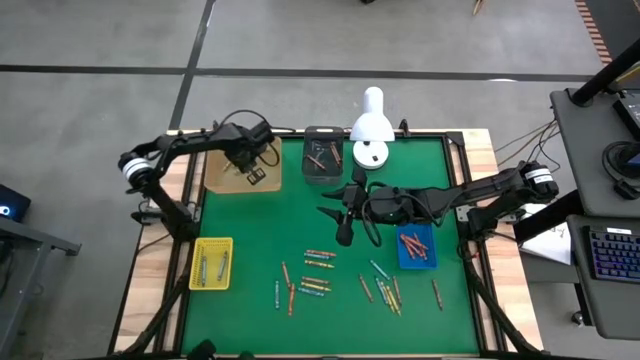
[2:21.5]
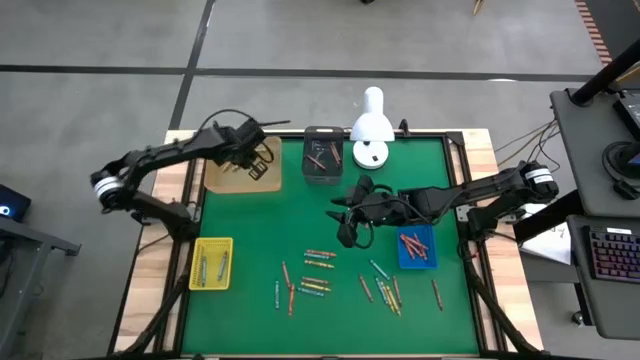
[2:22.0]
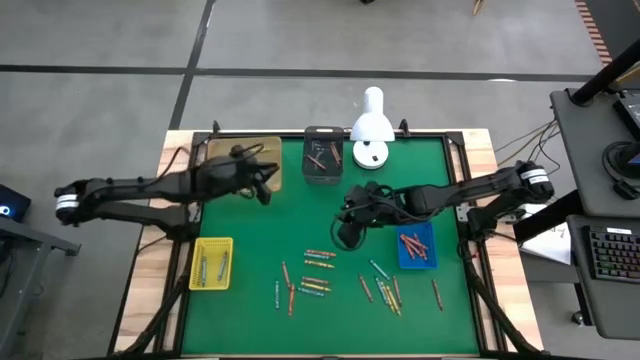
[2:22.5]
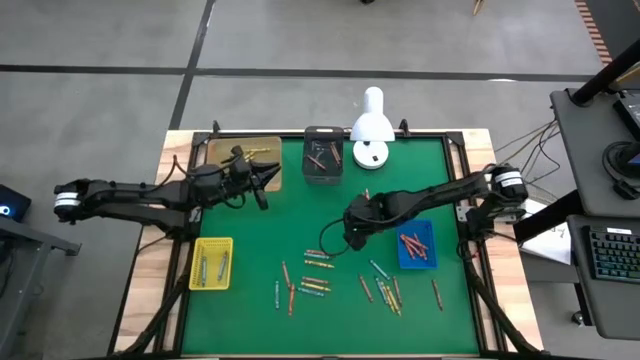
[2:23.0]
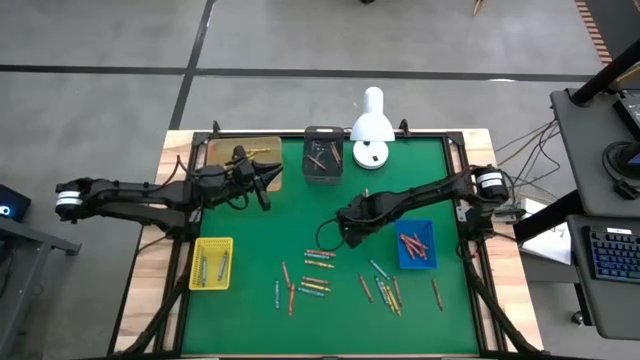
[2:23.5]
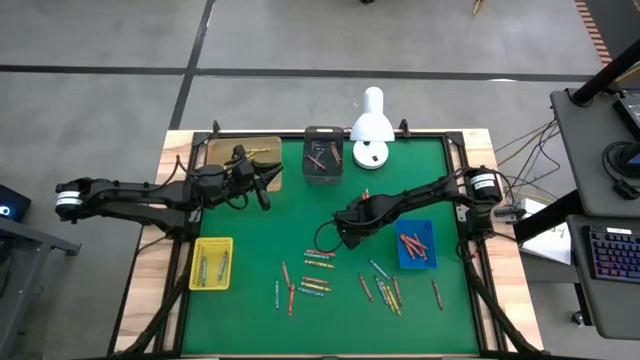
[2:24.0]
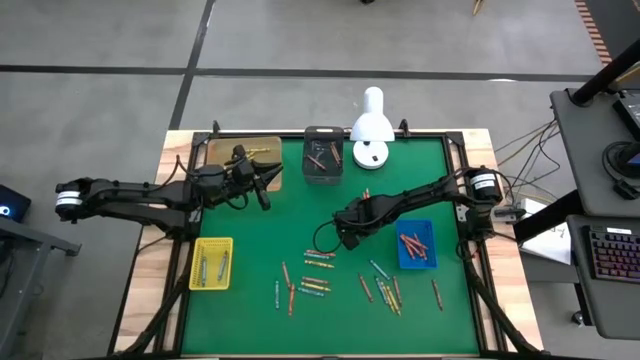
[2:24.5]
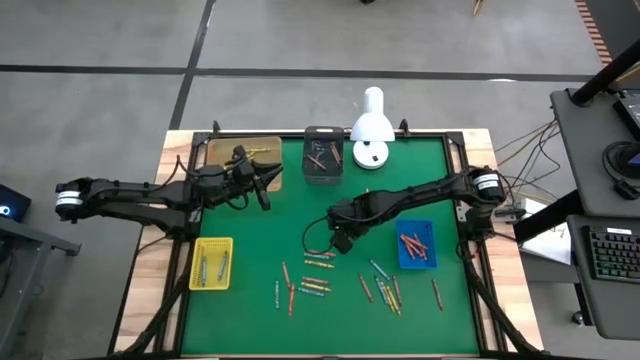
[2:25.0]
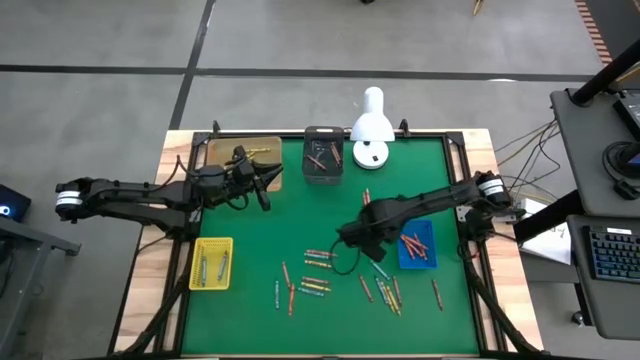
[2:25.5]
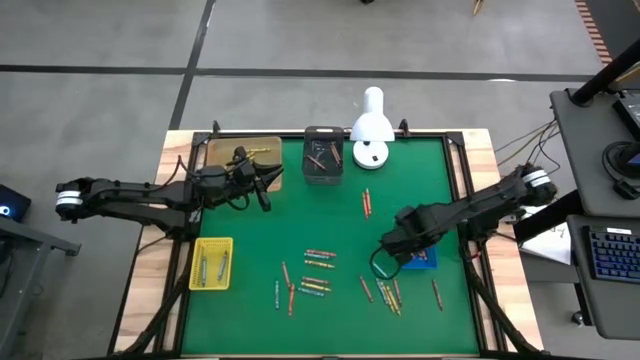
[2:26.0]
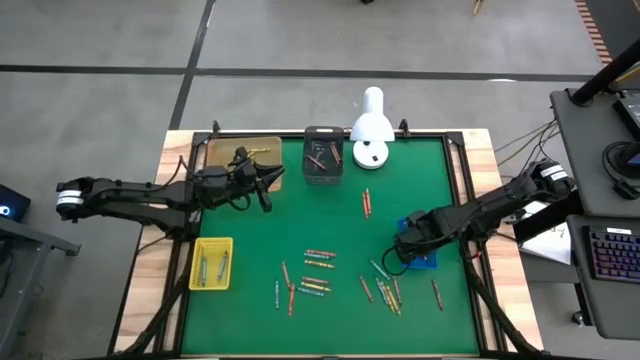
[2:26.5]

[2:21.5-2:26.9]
Task: Sort crayons
Put the orange crayon into the blue bin

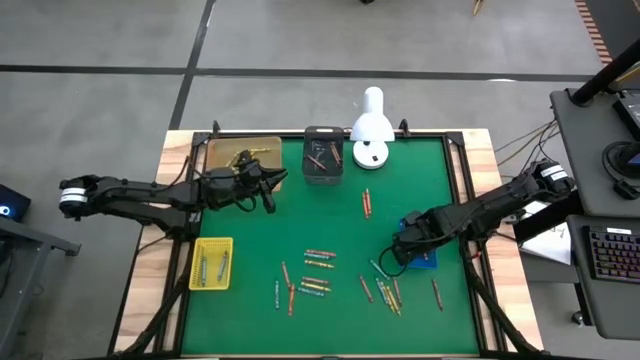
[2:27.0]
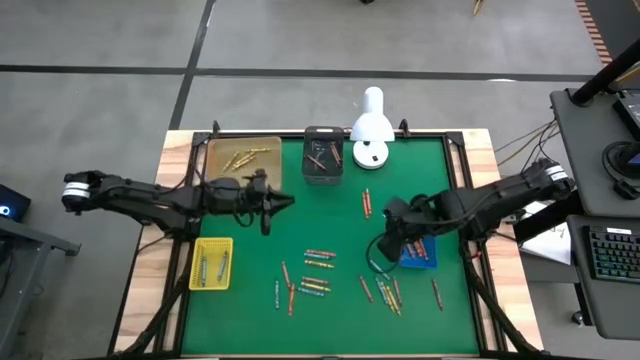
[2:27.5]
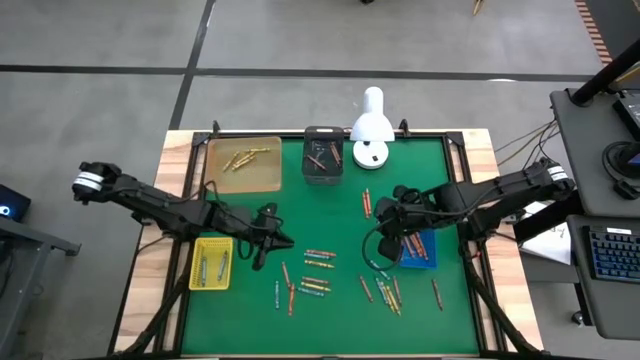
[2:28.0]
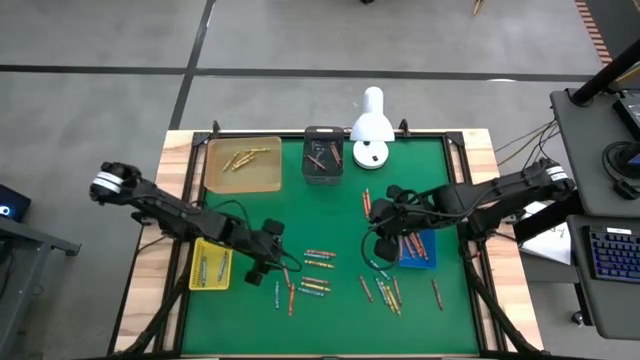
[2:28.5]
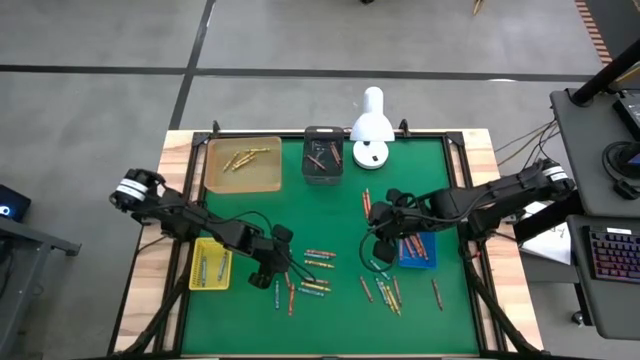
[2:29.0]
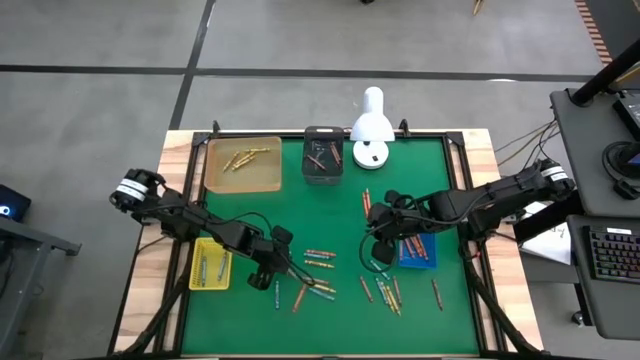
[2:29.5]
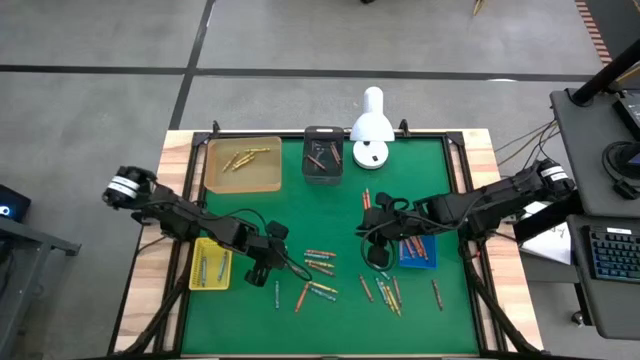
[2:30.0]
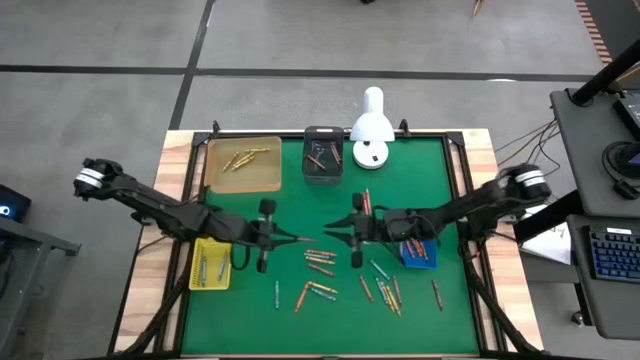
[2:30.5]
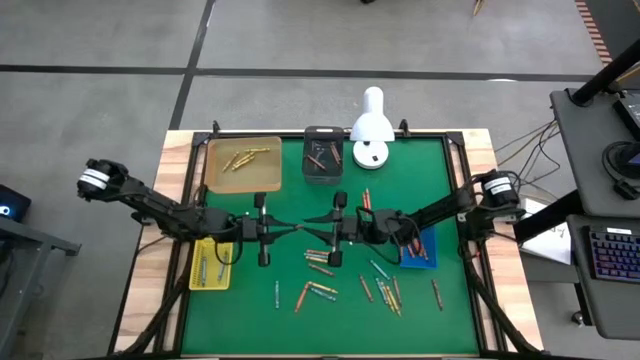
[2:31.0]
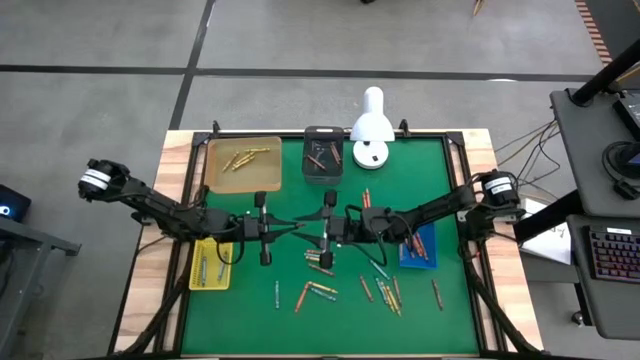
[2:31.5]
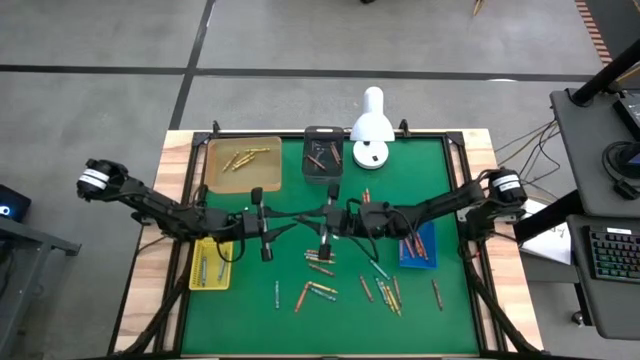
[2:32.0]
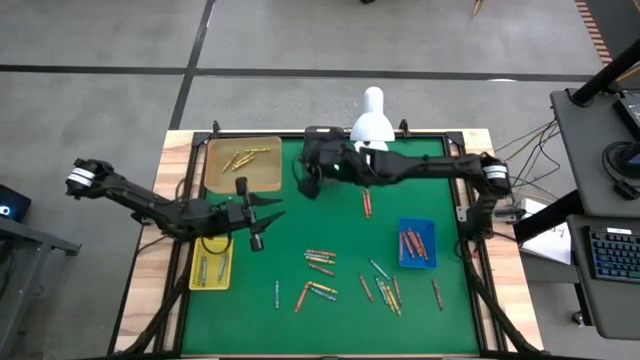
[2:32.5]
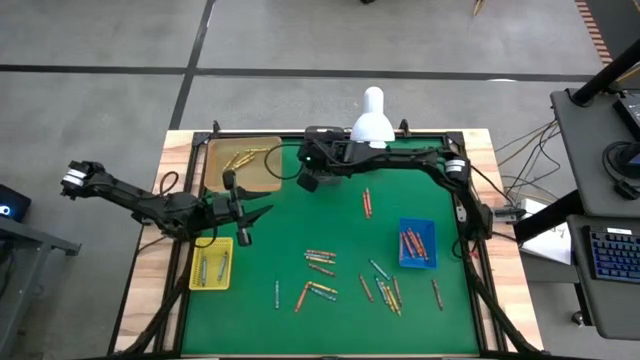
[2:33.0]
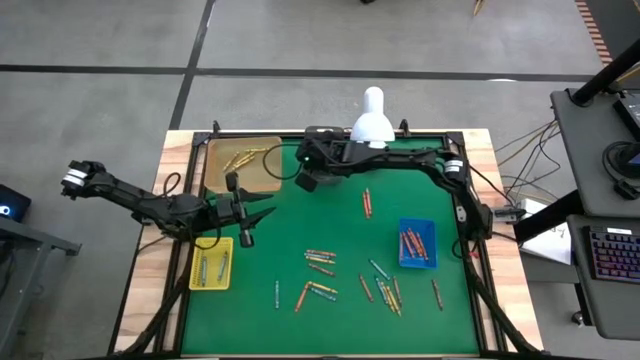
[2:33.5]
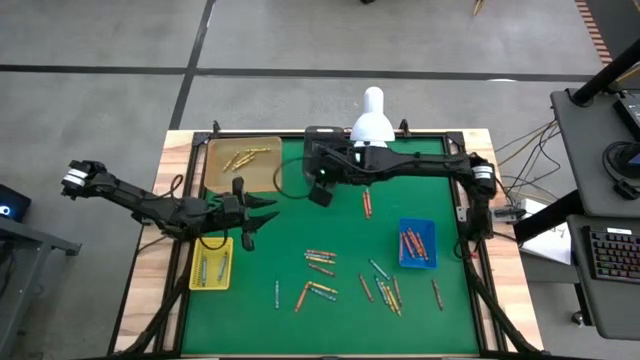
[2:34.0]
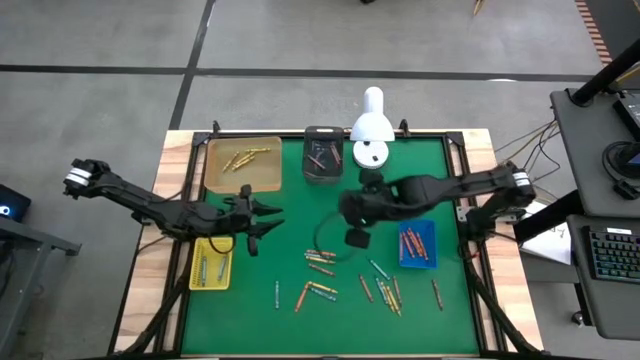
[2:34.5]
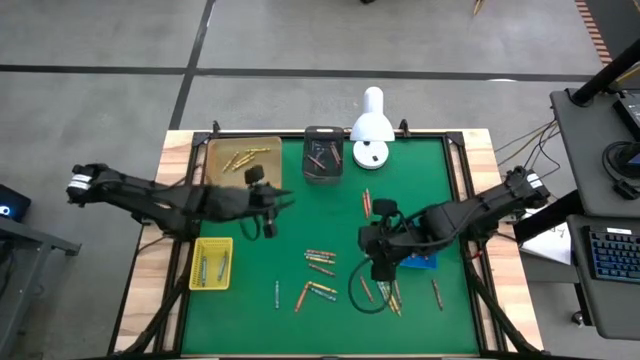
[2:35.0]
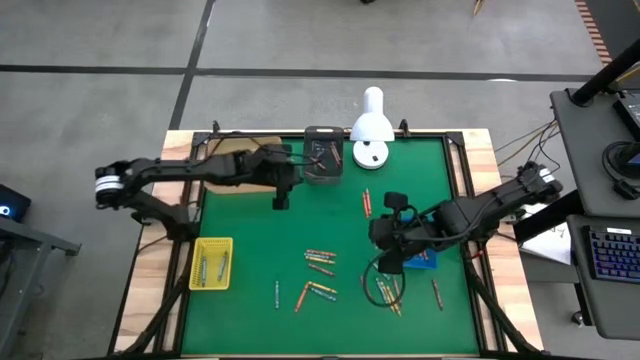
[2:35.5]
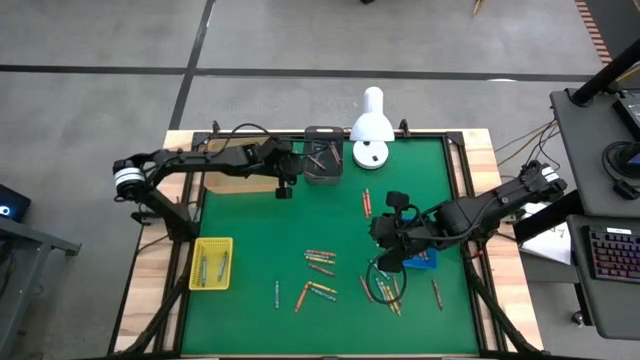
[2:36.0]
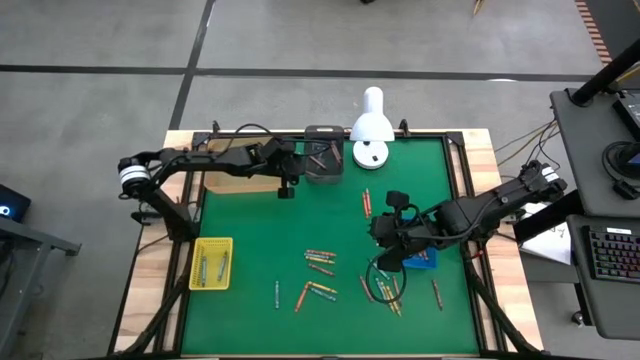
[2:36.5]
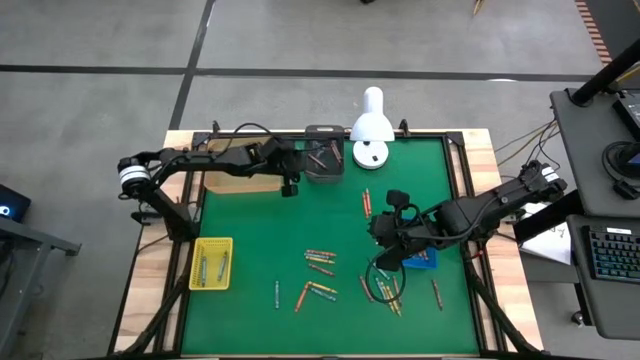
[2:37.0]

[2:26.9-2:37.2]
Put the brown crayon into the black bin

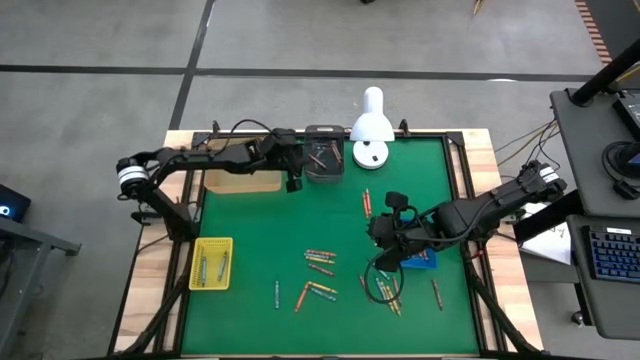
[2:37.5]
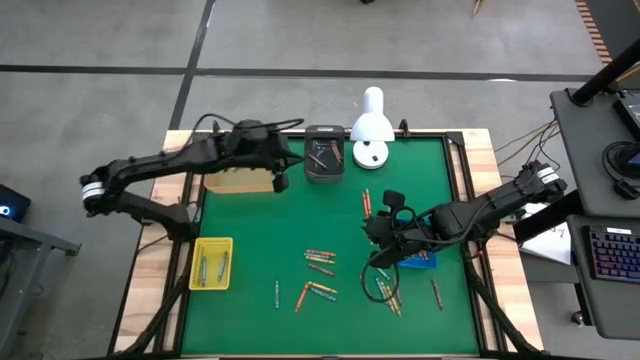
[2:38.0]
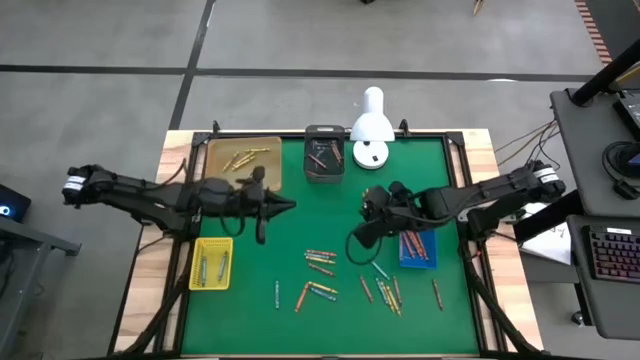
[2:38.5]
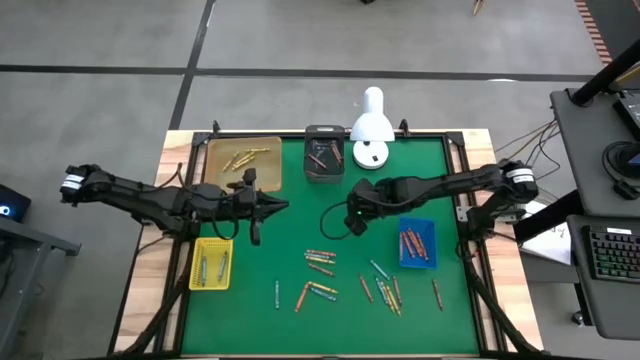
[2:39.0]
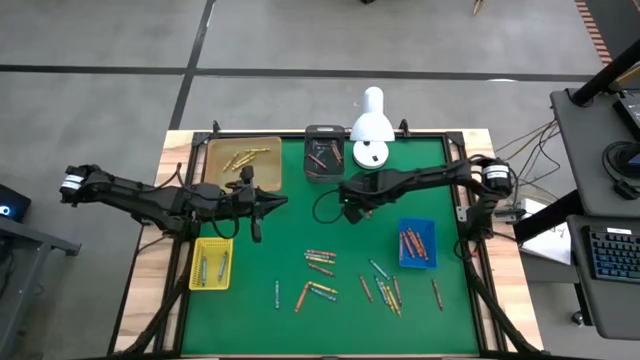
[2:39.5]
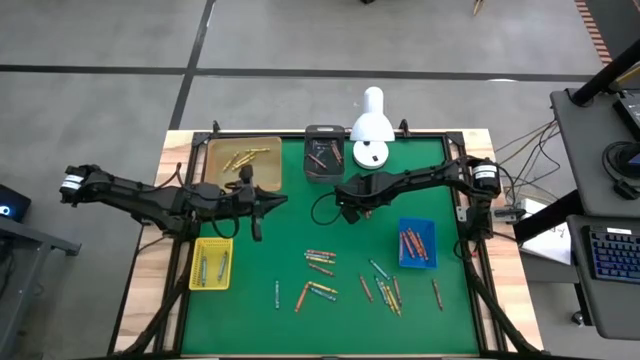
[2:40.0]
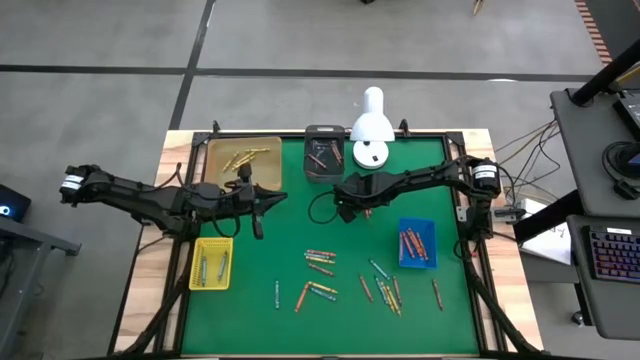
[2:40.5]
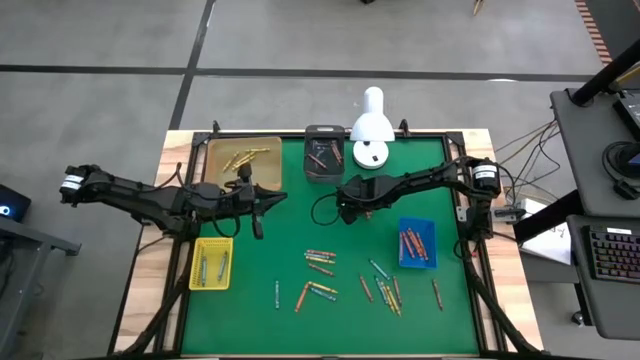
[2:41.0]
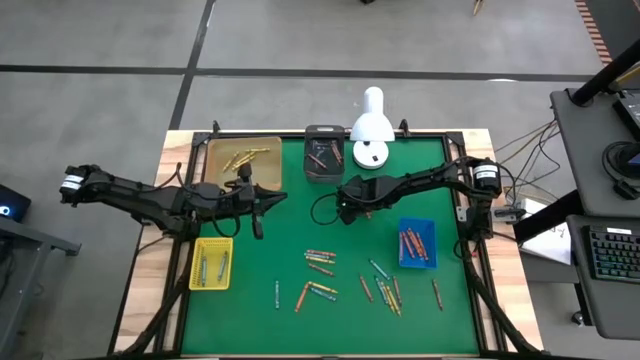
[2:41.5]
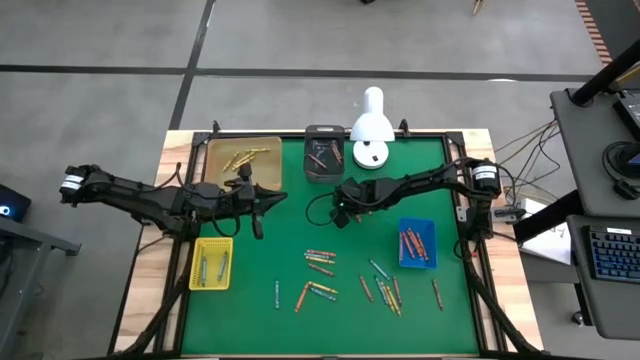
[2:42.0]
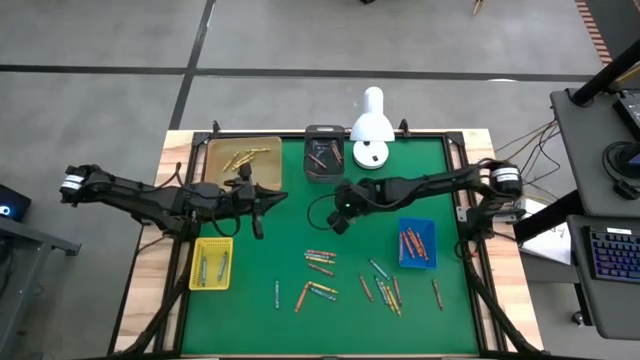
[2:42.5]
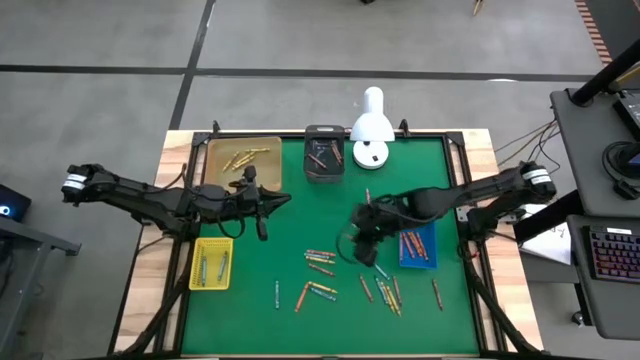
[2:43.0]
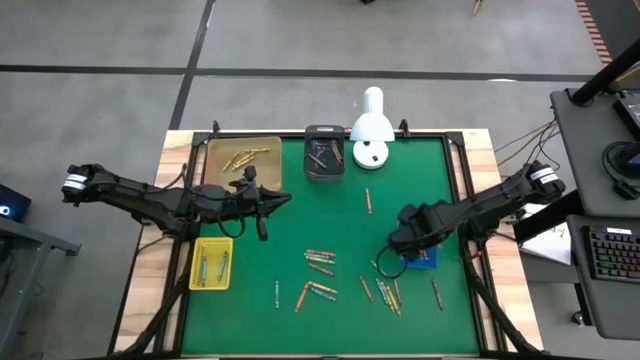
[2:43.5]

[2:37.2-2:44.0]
Put the orange crayon into the blue bin
